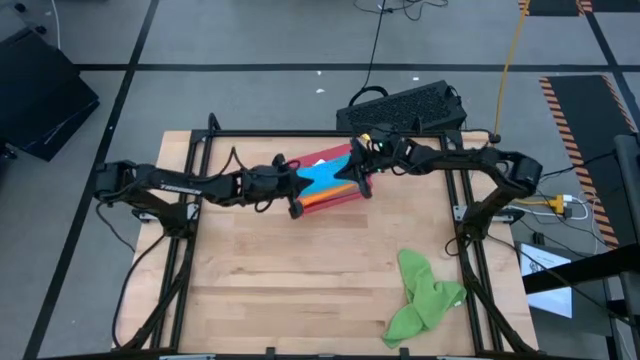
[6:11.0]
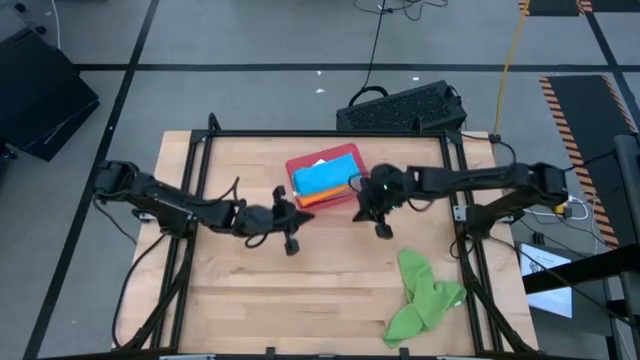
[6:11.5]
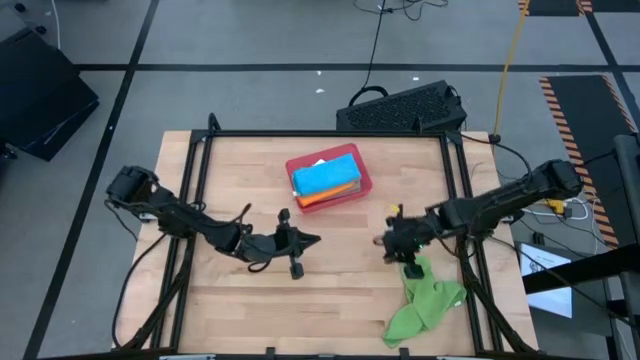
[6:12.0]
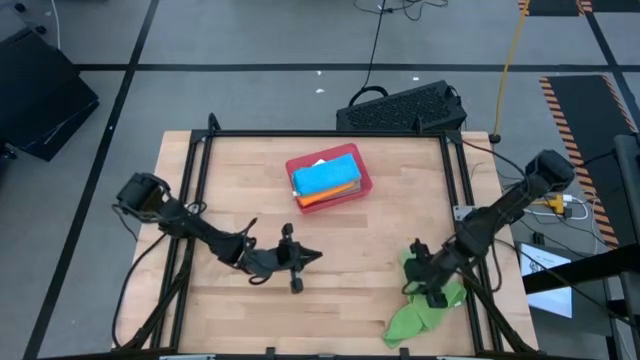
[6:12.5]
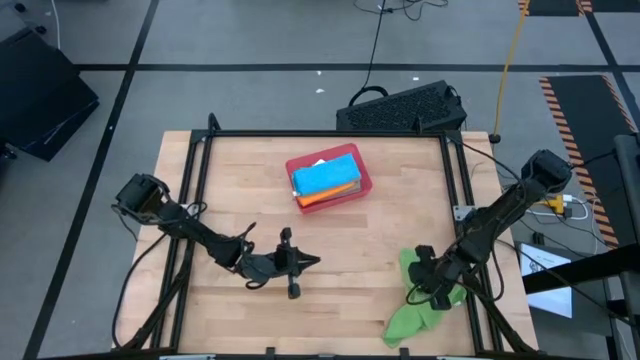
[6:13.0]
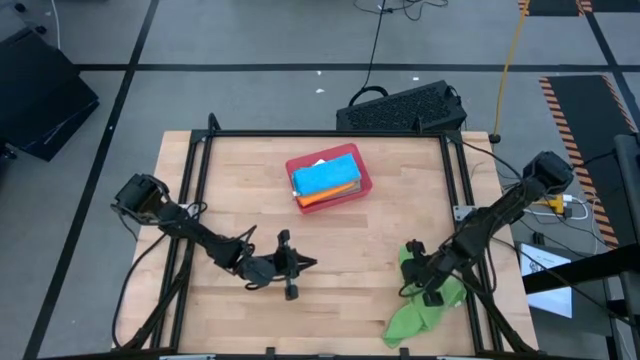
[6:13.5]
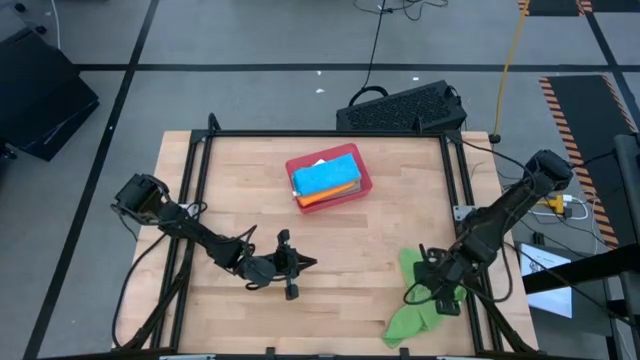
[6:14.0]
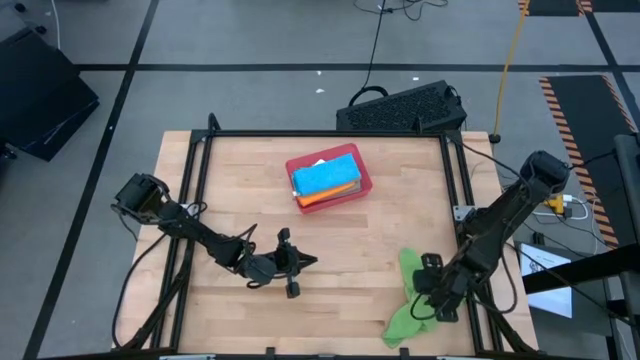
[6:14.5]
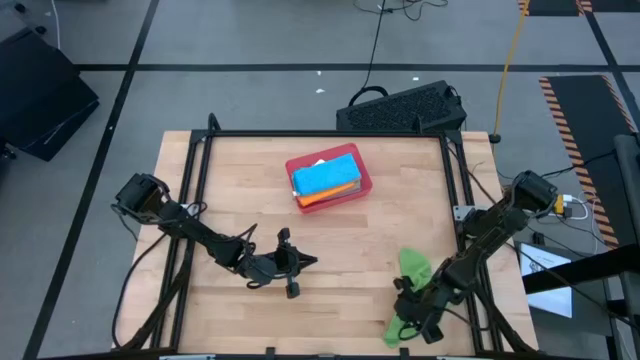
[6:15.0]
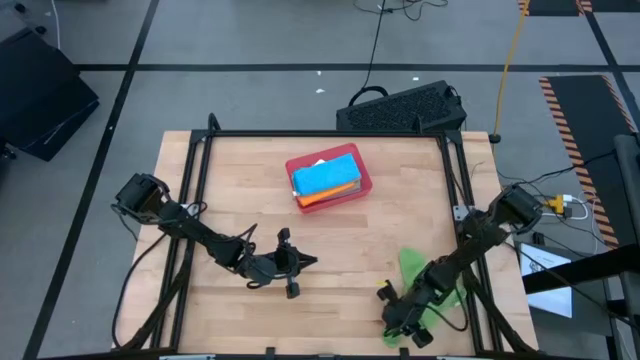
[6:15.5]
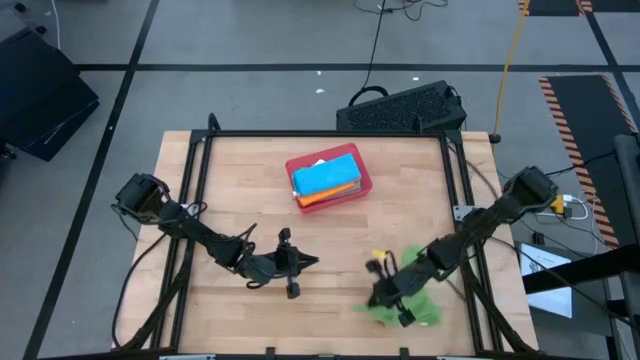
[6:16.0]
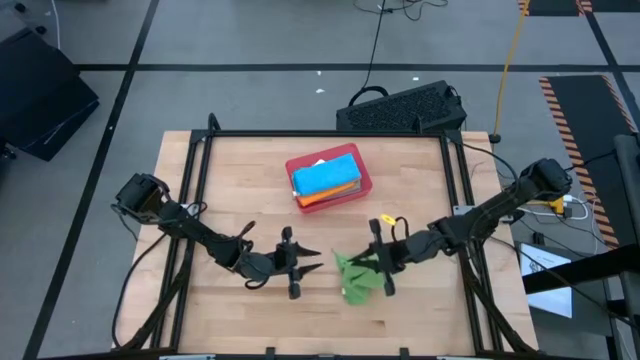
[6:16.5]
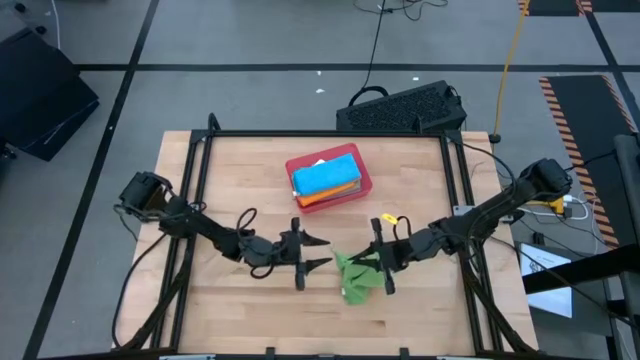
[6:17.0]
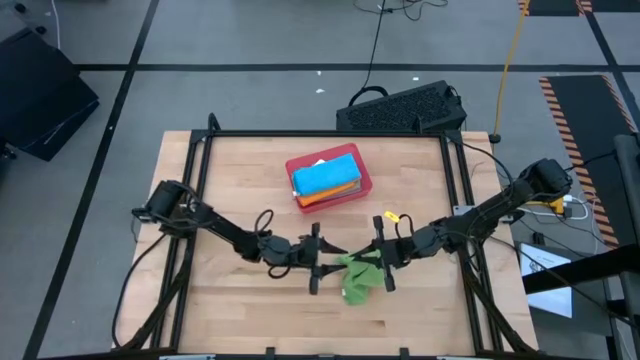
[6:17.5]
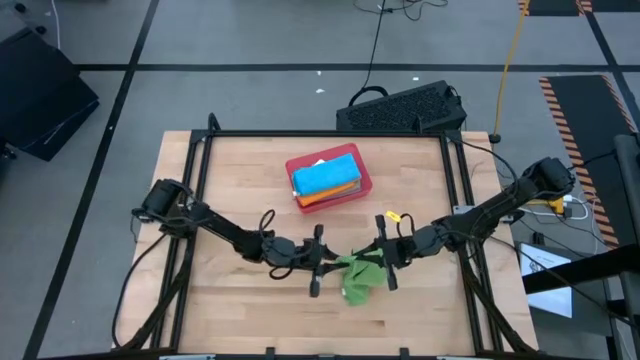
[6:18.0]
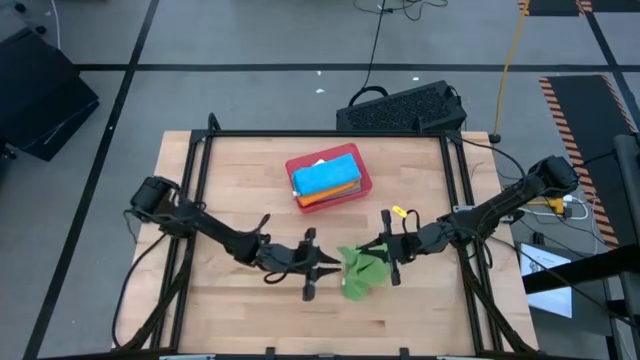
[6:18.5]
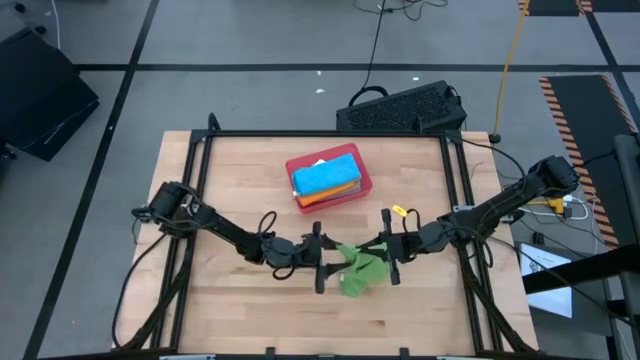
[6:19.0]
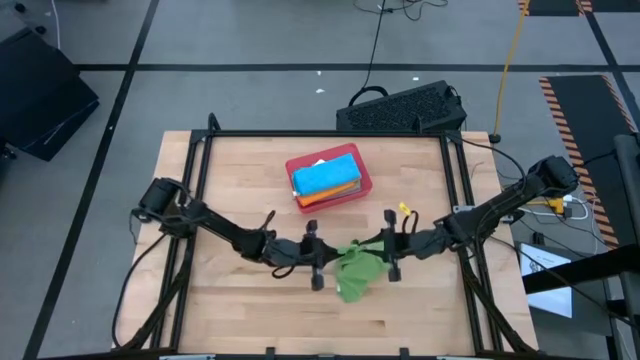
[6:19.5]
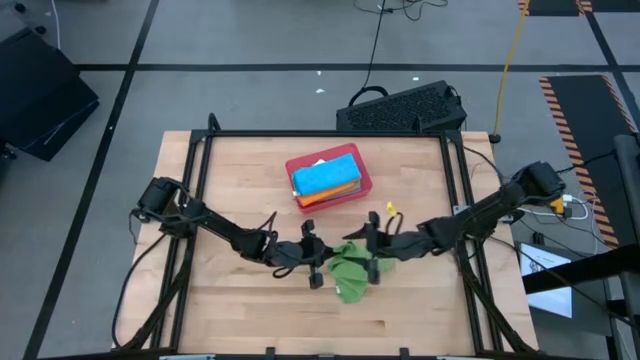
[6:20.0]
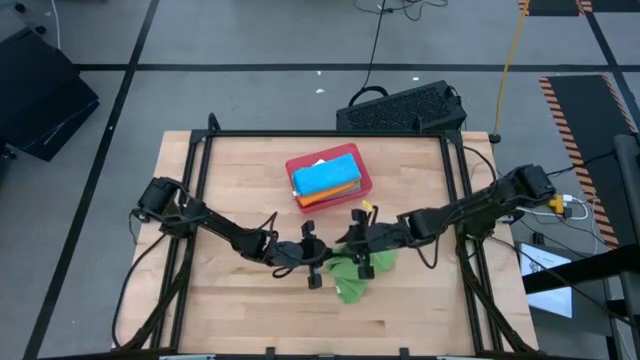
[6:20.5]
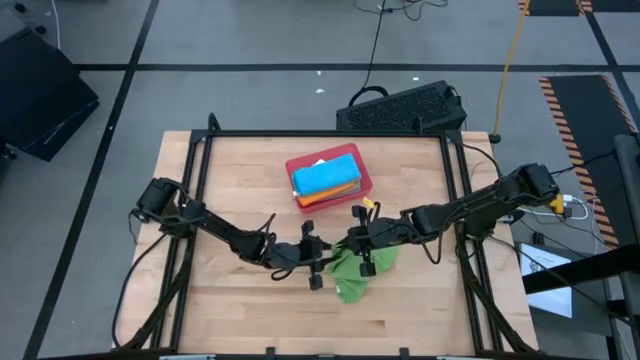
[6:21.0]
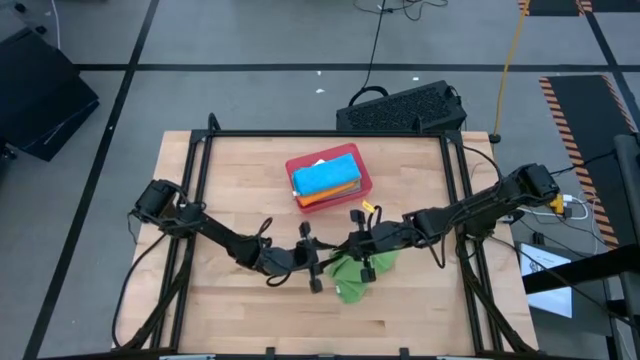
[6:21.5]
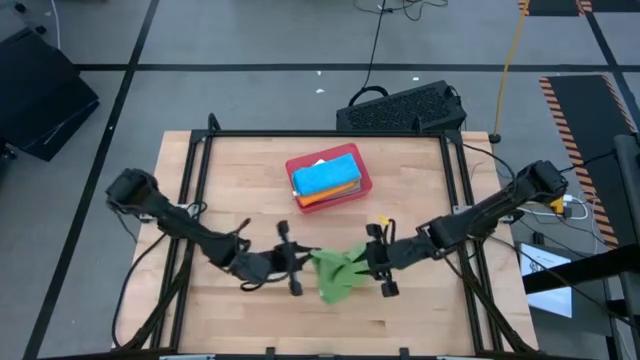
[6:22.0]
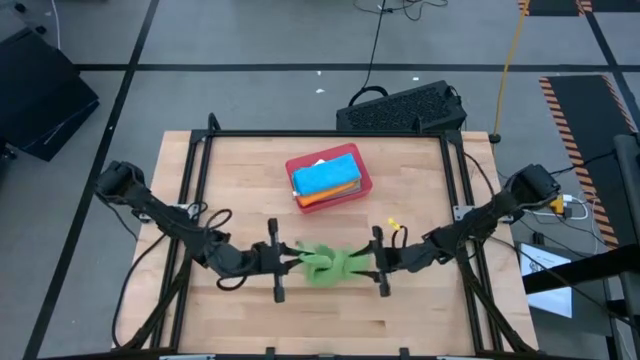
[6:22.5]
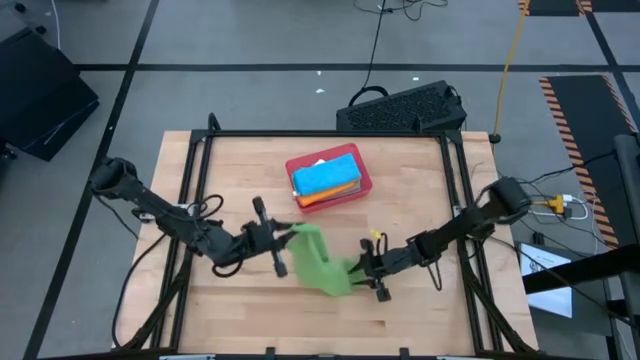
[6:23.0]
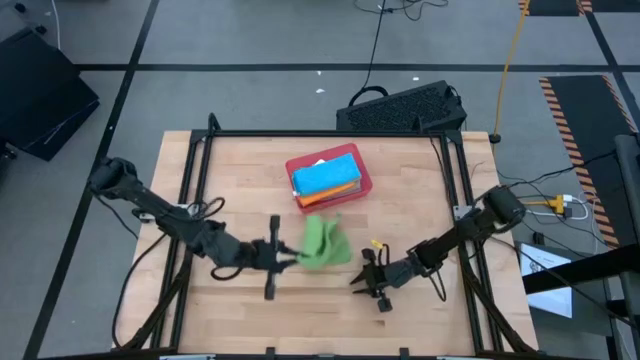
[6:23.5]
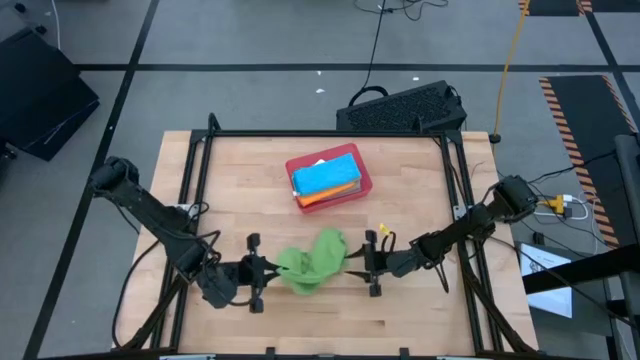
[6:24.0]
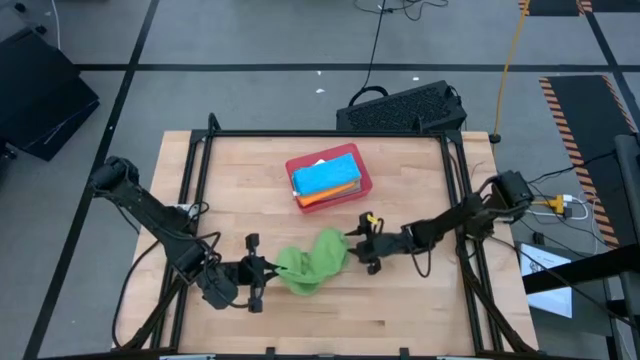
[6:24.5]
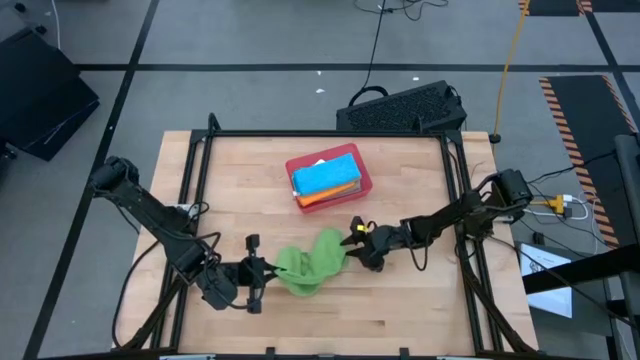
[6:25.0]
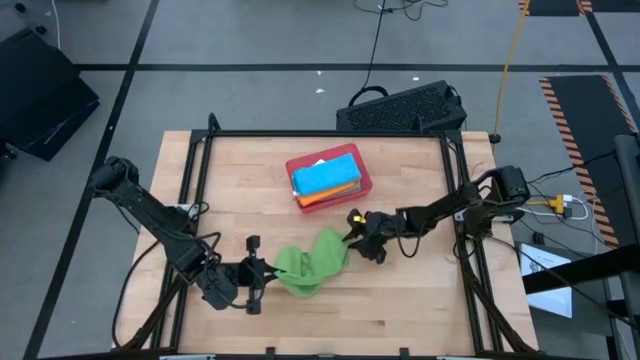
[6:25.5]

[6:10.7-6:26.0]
Task: Fold microfiber towels
Fold the green microfiber cloth
